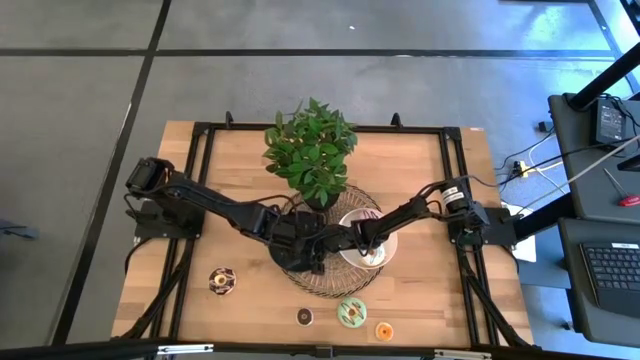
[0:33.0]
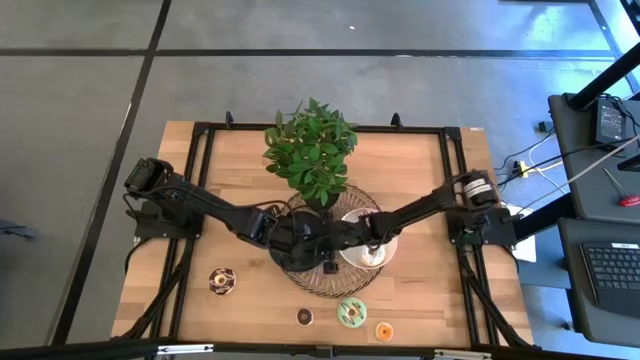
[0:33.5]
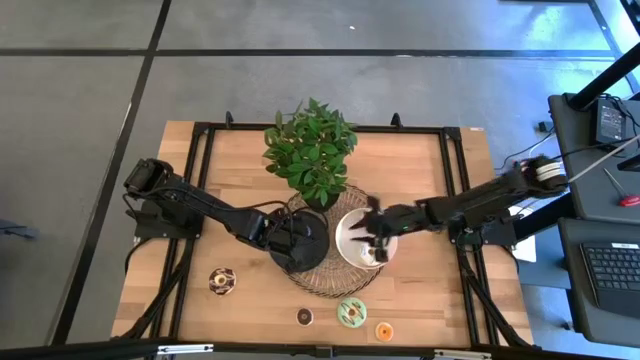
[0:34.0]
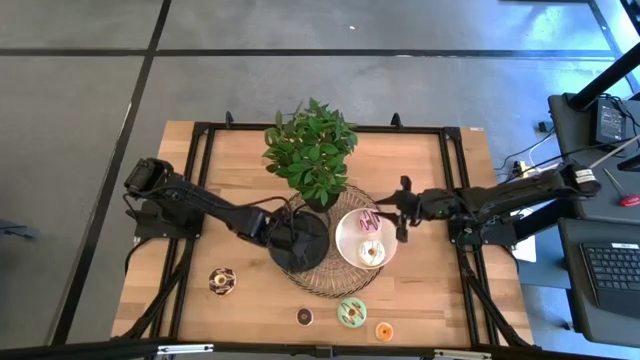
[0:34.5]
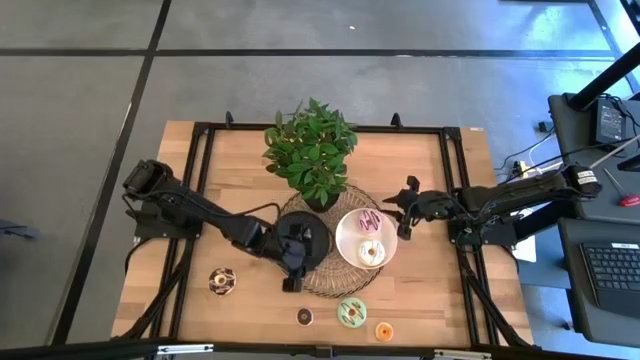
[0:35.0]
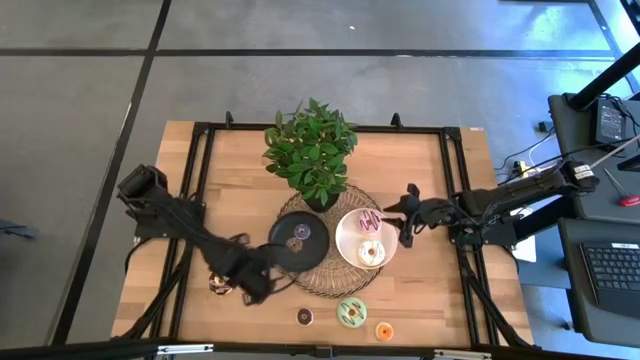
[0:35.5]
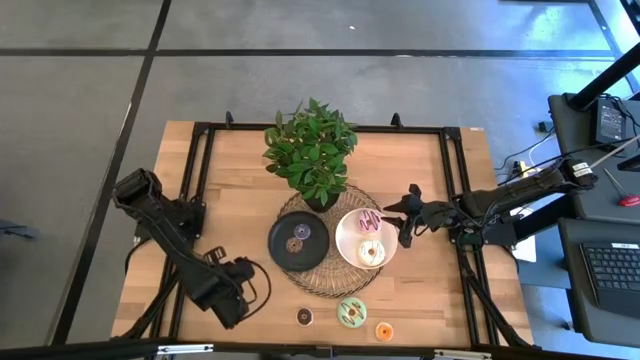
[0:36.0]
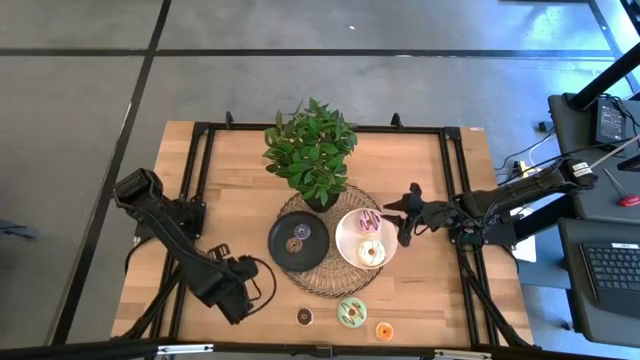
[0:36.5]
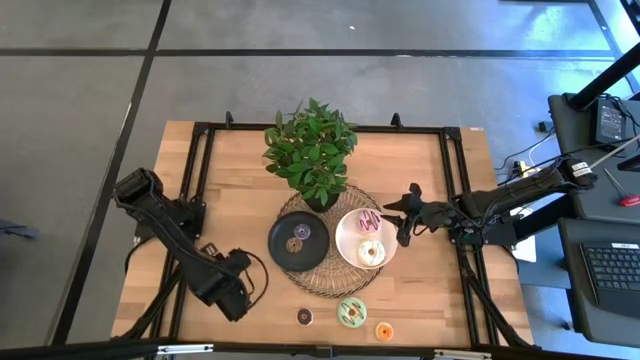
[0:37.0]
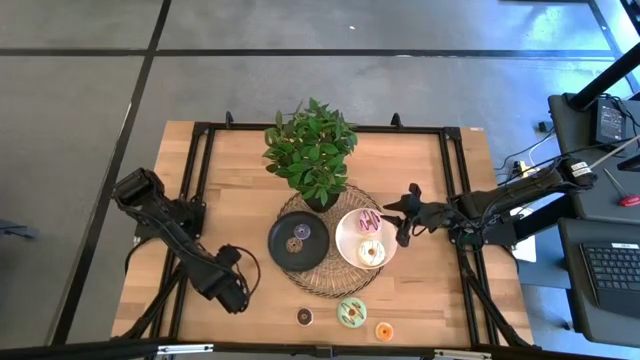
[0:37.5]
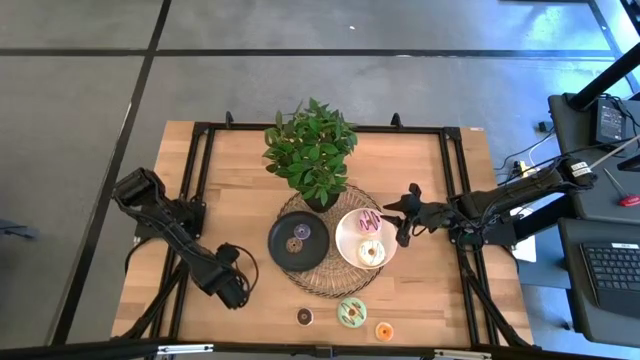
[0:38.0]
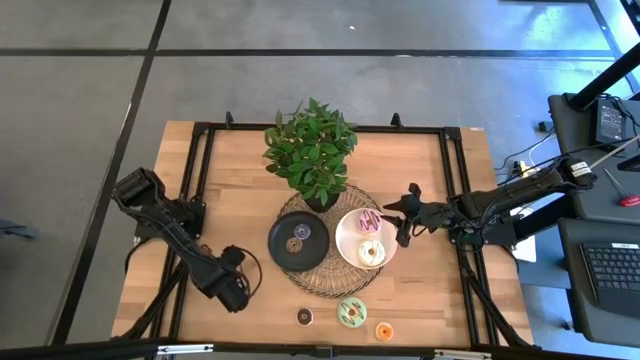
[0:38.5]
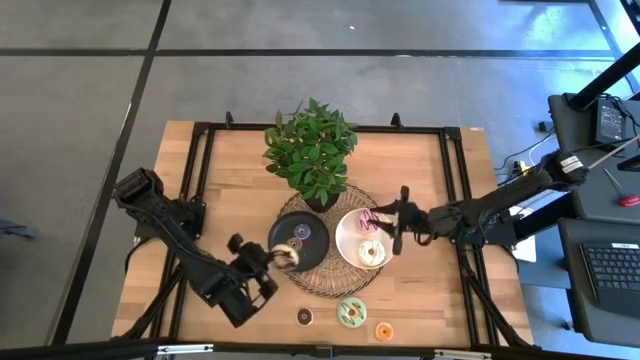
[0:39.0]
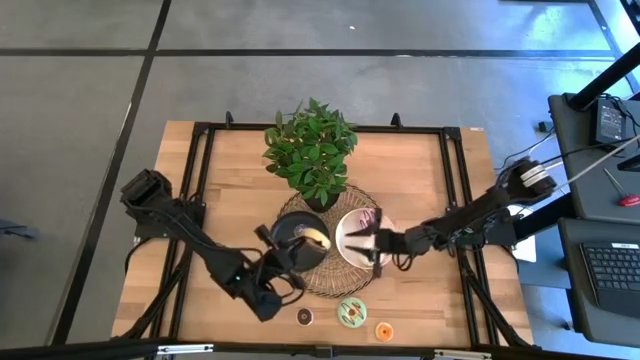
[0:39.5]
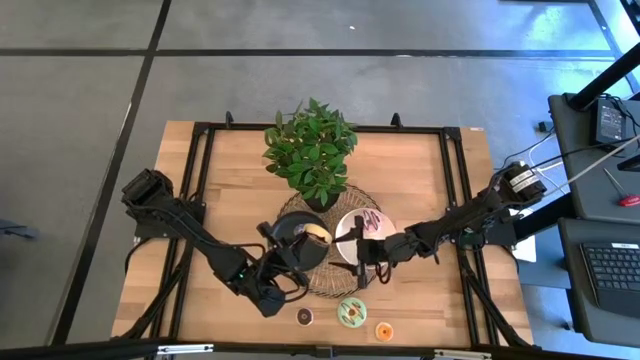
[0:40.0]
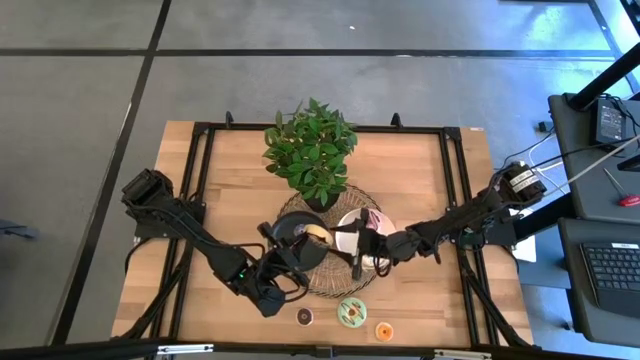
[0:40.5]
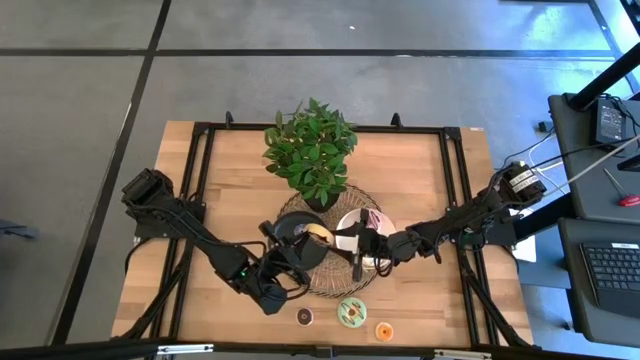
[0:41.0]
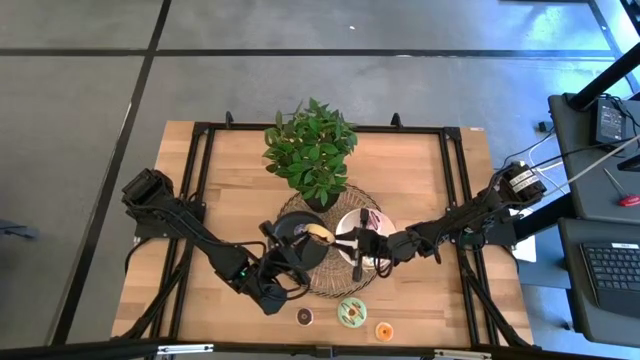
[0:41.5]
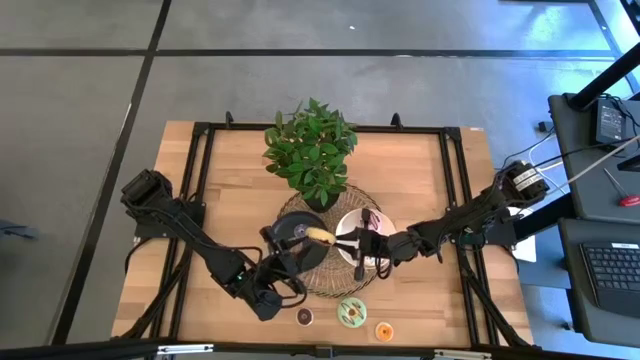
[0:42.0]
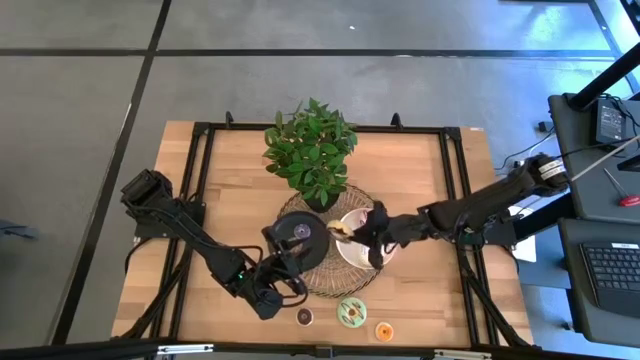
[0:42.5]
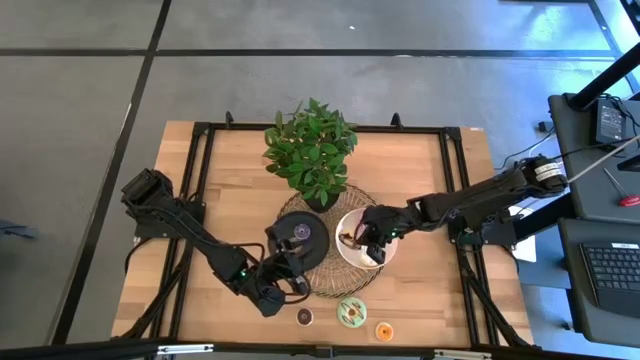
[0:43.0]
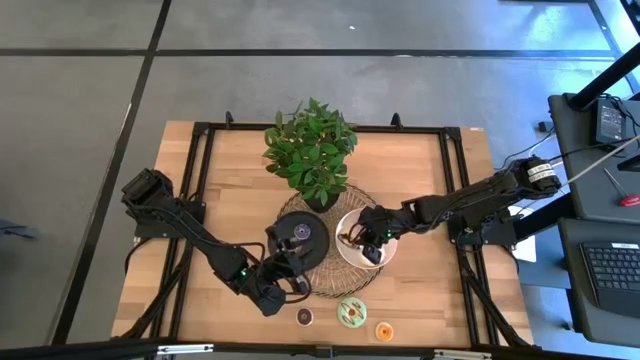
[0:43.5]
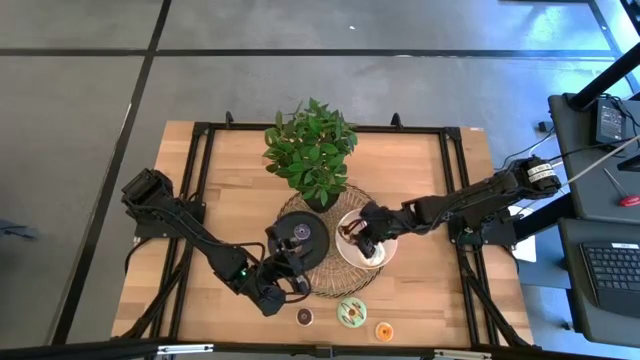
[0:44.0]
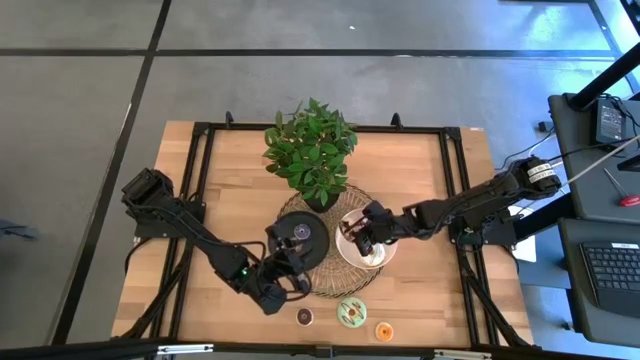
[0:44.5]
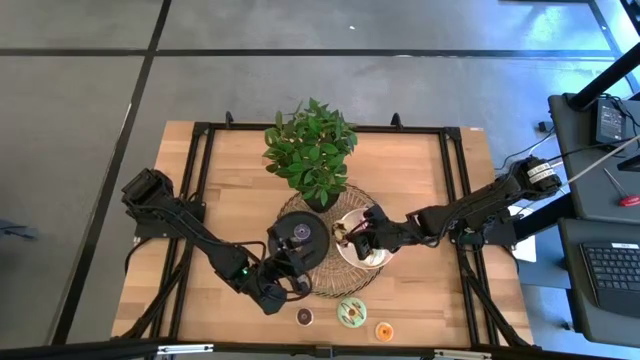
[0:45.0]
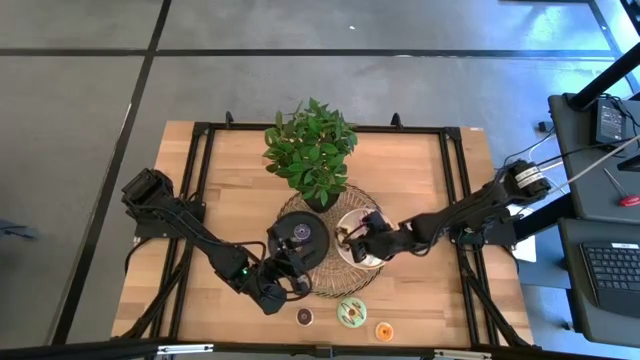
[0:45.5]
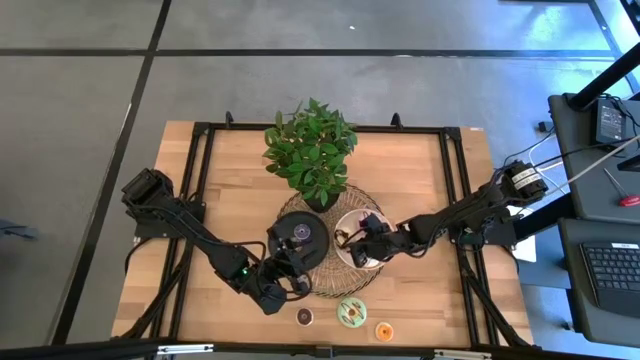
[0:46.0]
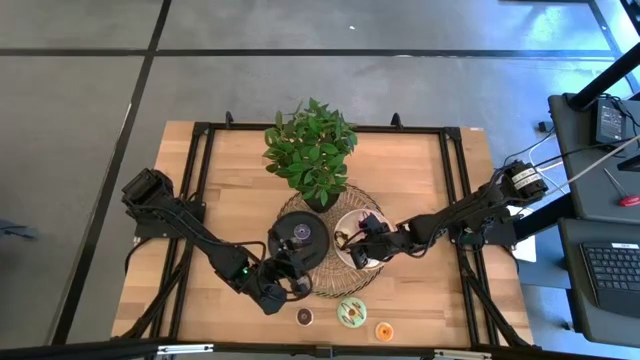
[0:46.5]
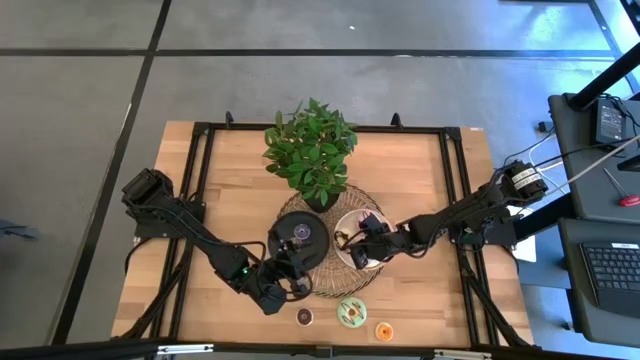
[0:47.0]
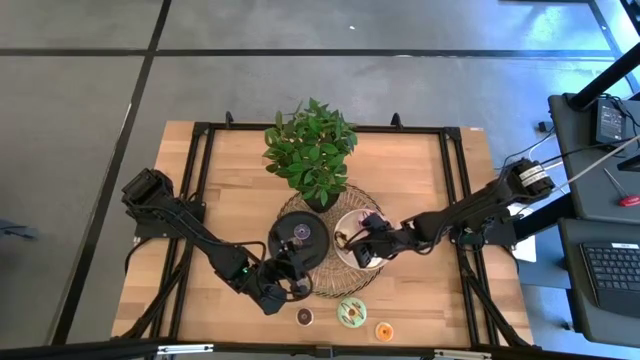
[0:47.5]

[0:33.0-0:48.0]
Task: Pick & Place donuts
Put the large black donut on the white plate

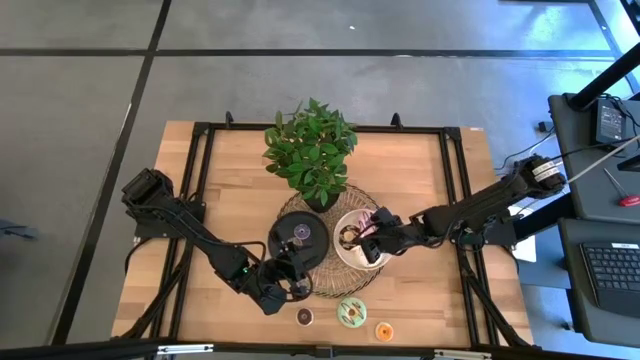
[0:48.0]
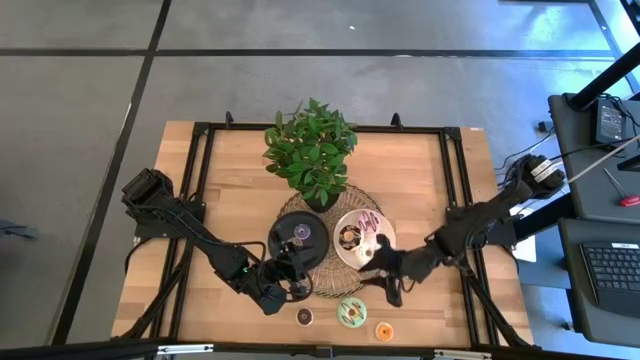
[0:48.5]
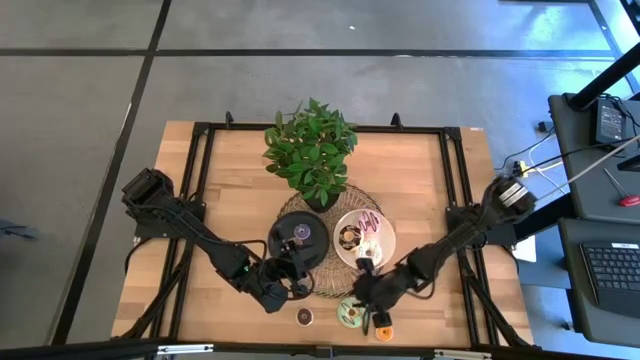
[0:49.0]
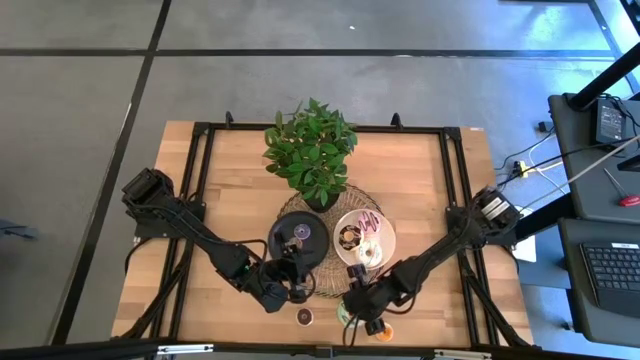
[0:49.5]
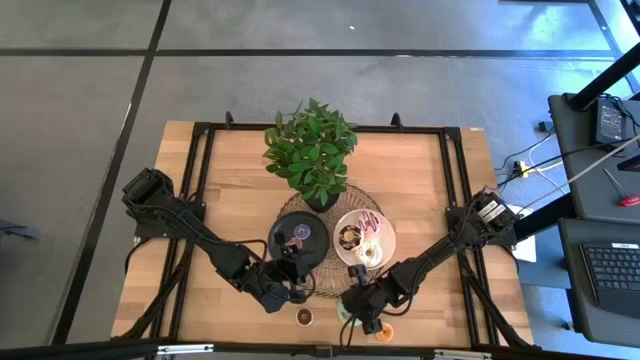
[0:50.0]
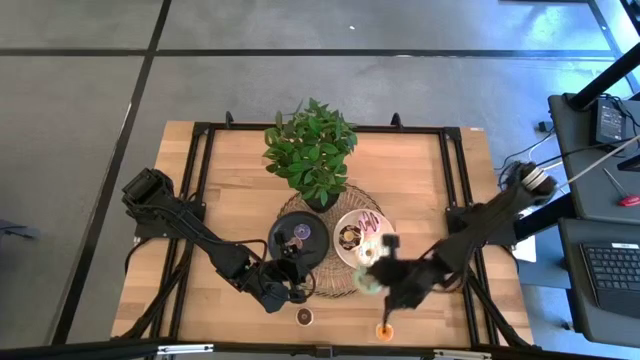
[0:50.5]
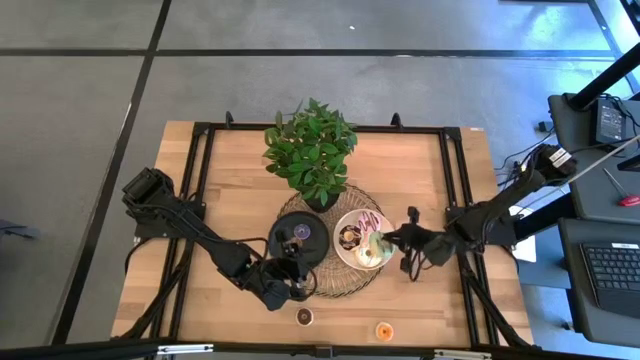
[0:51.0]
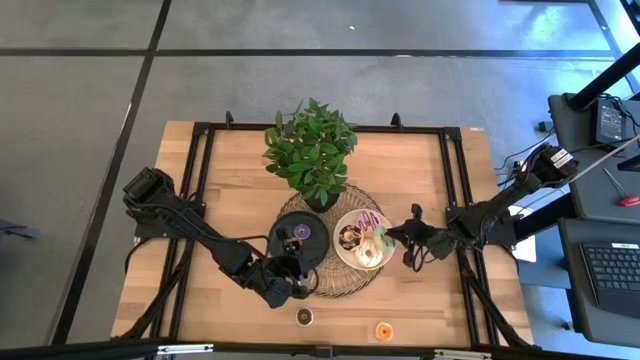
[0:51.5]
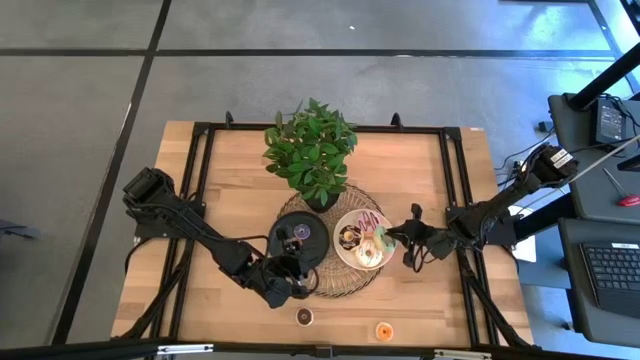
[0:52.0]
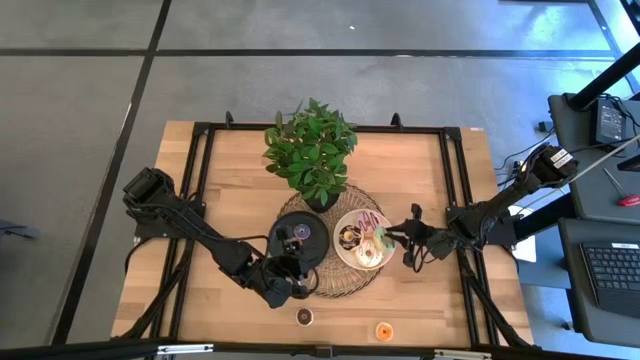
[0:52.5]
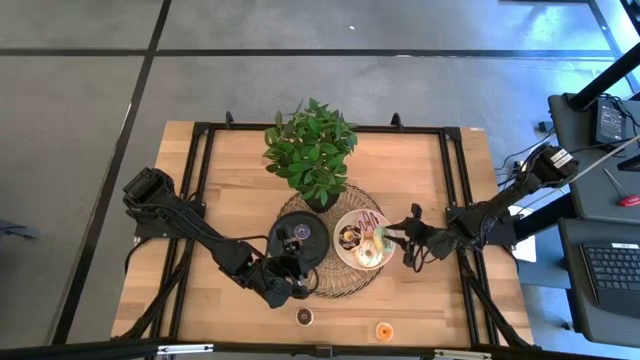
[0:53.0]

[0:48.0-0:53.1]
Put the large light blue donut on the white plate

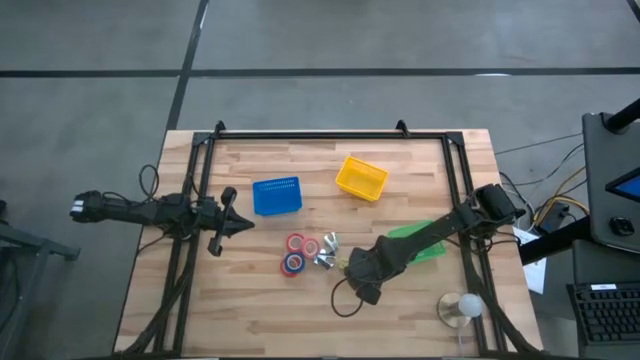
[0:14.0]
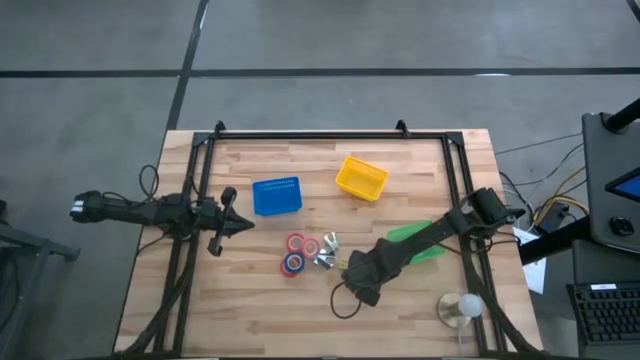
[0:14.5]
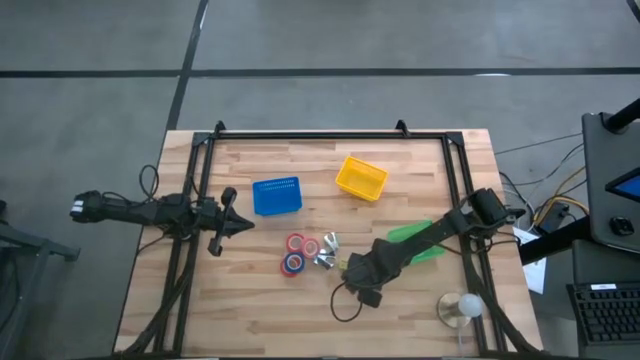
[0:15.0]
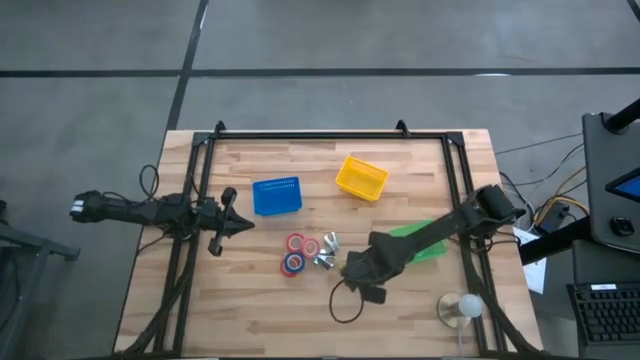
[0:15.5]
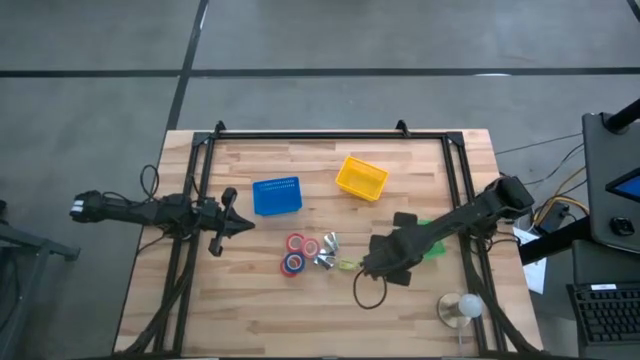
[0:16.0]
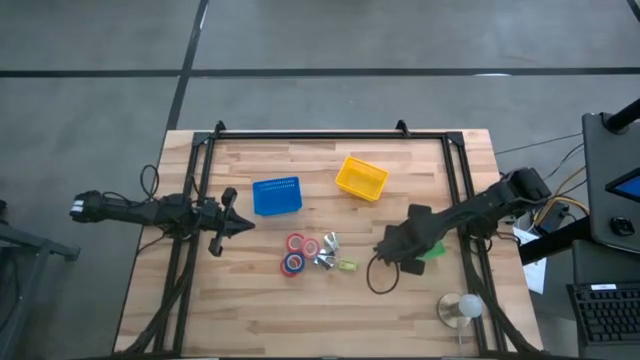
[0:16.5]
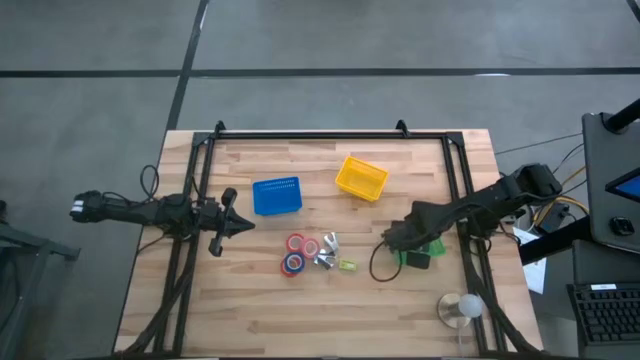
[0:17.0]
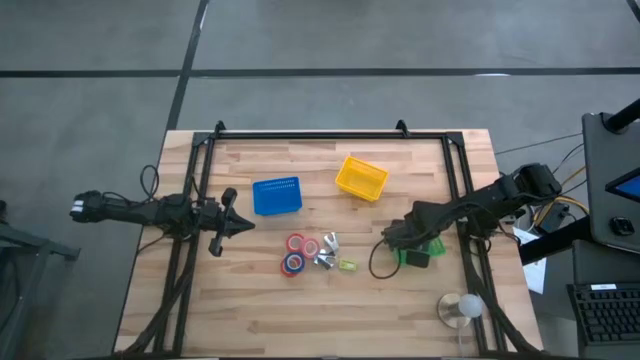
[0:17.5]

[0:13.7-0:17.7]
Task: Pick and place Stapler, Stapler remover, tape
Put the right green staple box into the green bin
